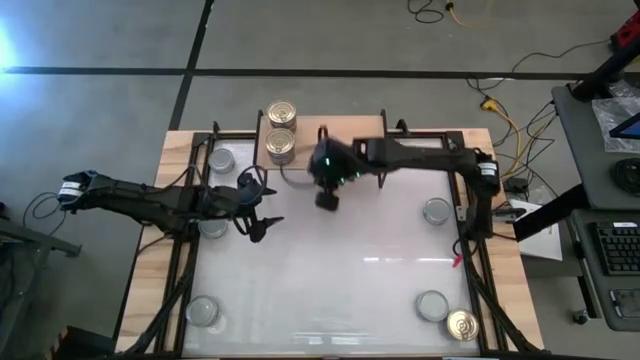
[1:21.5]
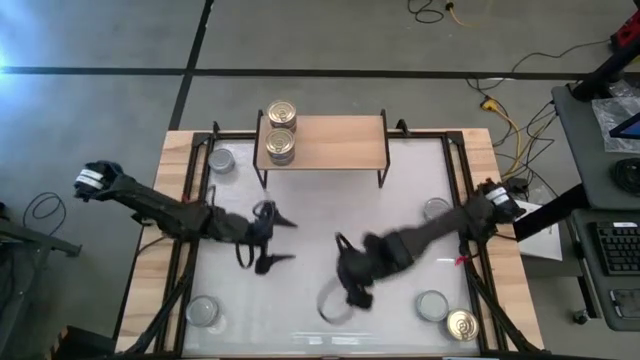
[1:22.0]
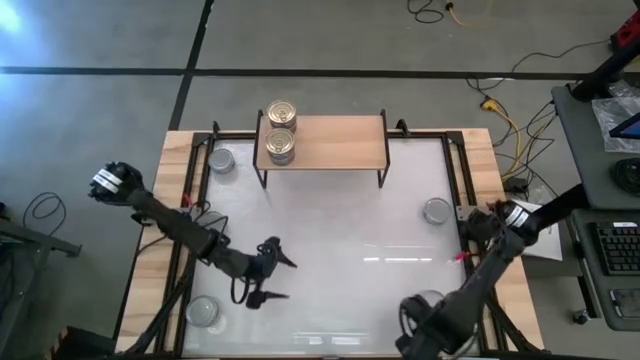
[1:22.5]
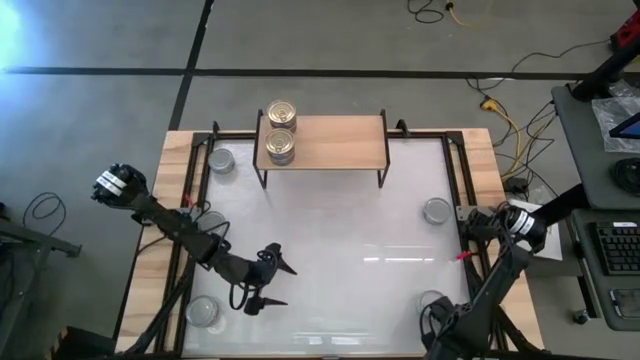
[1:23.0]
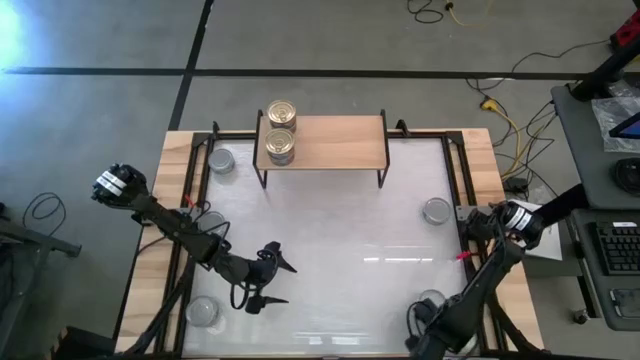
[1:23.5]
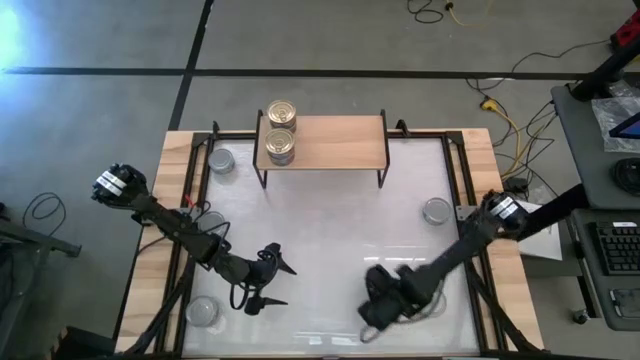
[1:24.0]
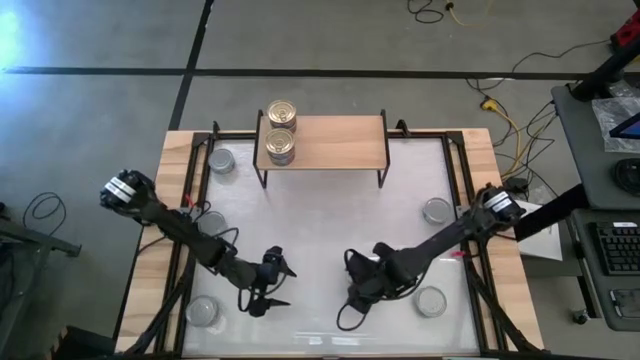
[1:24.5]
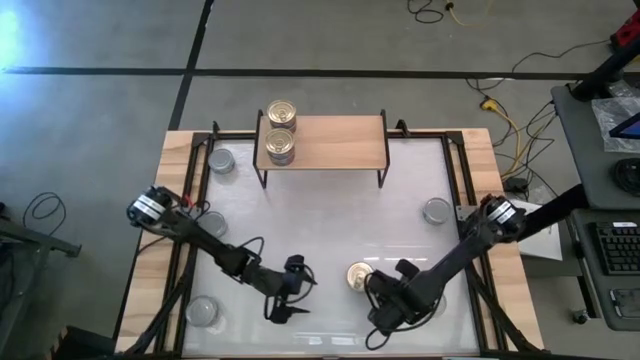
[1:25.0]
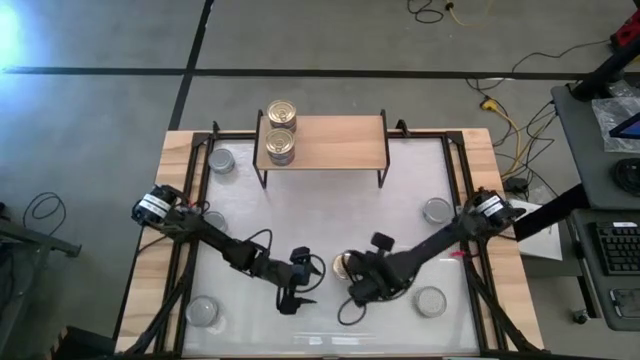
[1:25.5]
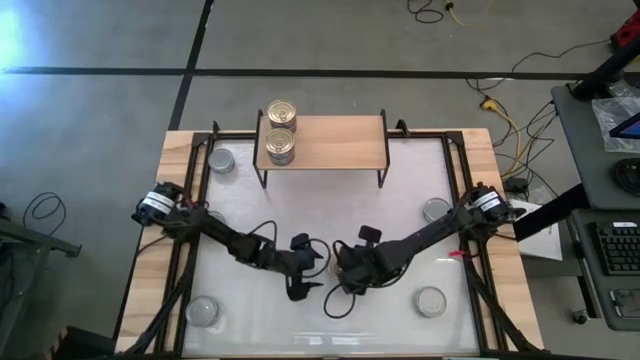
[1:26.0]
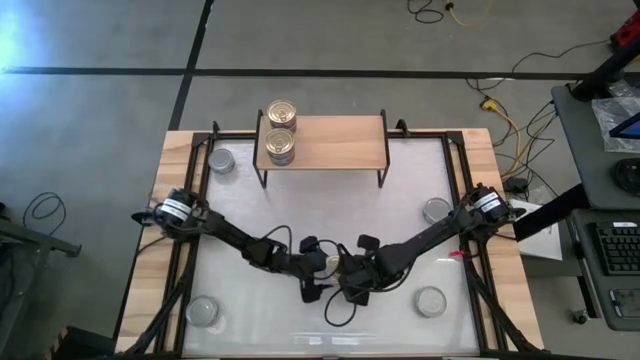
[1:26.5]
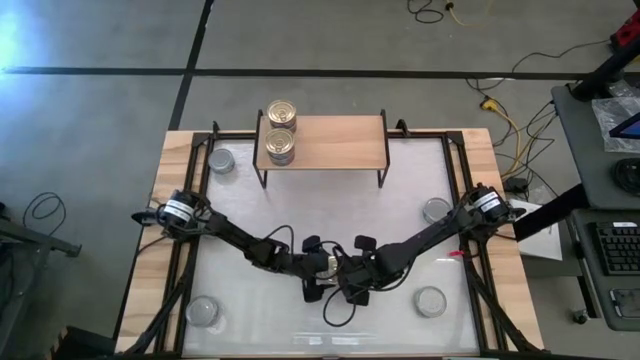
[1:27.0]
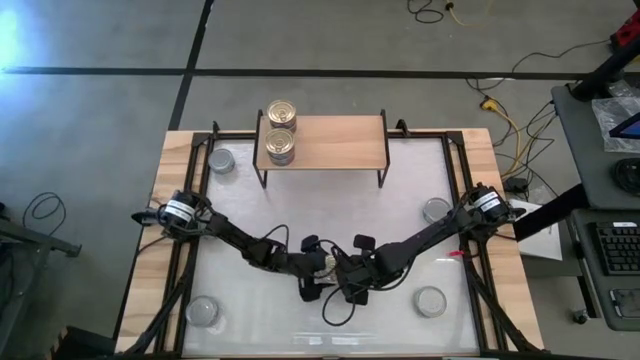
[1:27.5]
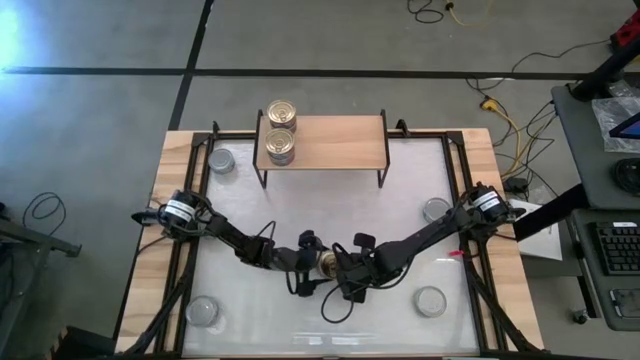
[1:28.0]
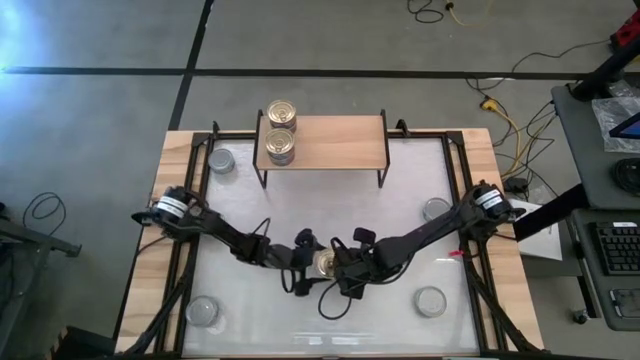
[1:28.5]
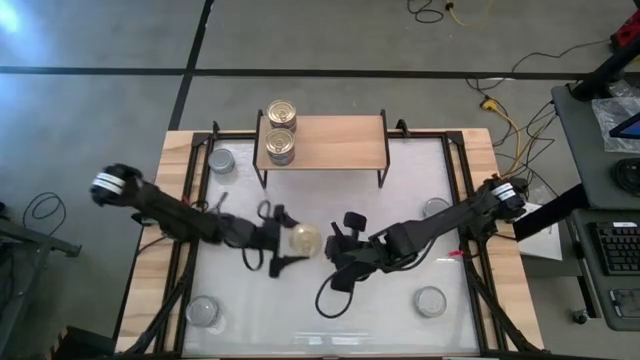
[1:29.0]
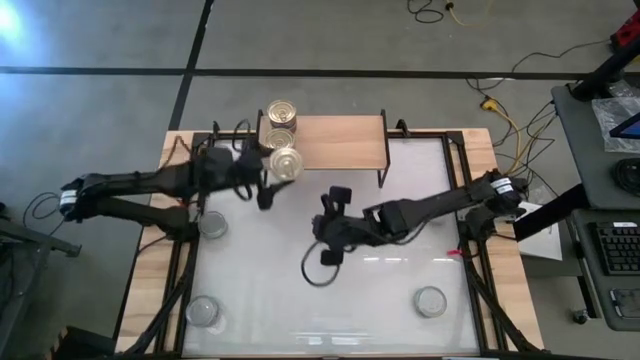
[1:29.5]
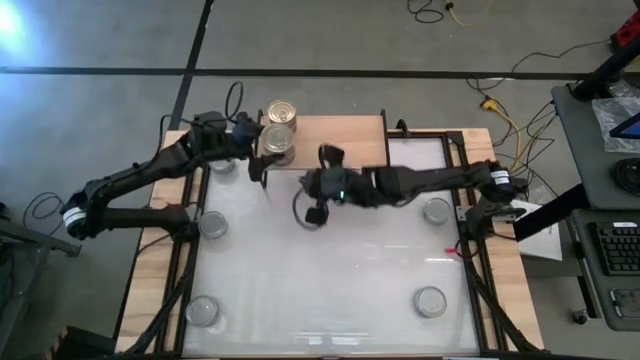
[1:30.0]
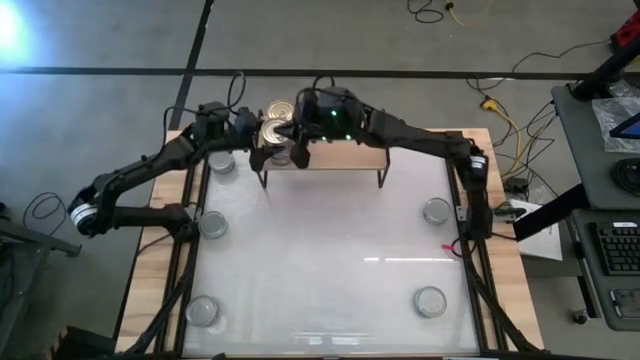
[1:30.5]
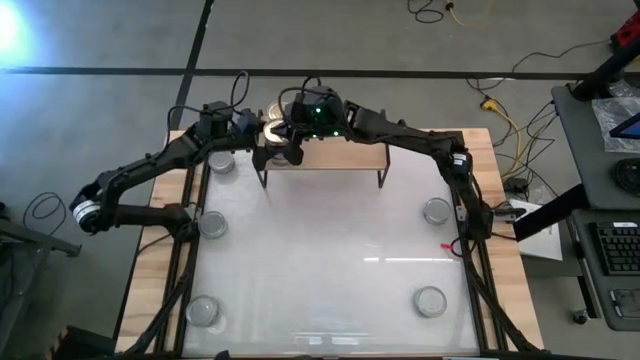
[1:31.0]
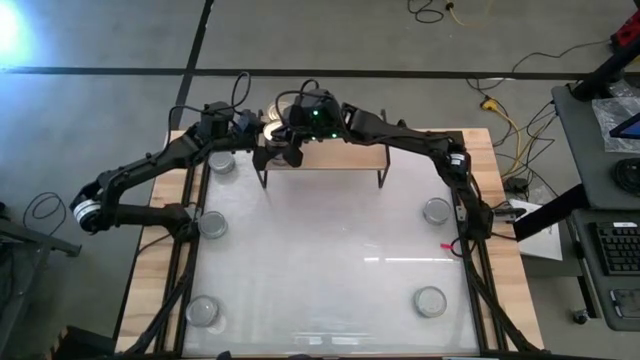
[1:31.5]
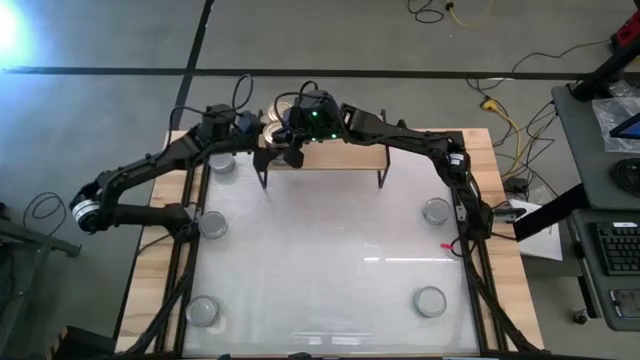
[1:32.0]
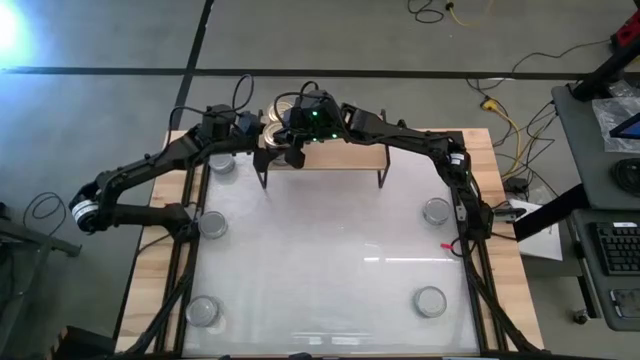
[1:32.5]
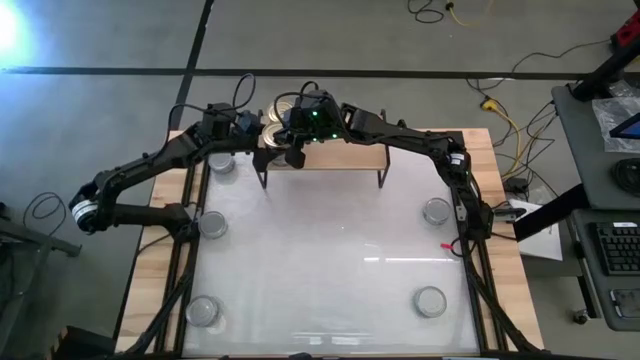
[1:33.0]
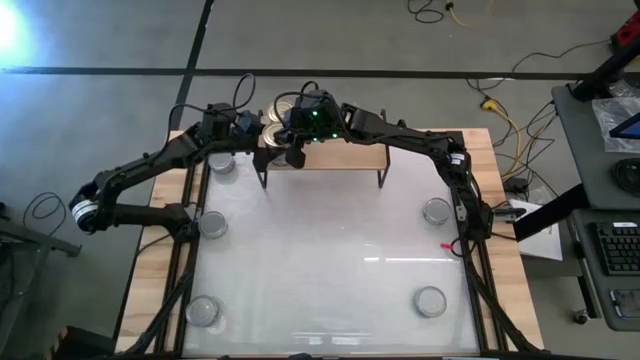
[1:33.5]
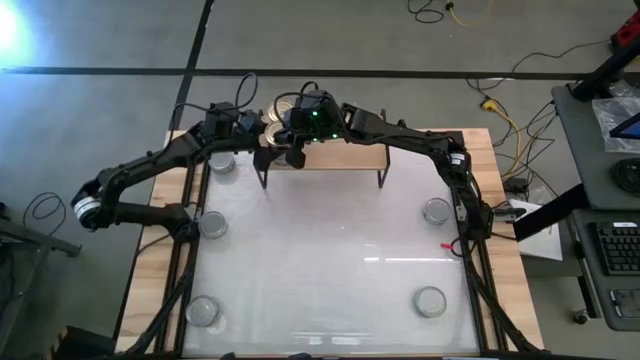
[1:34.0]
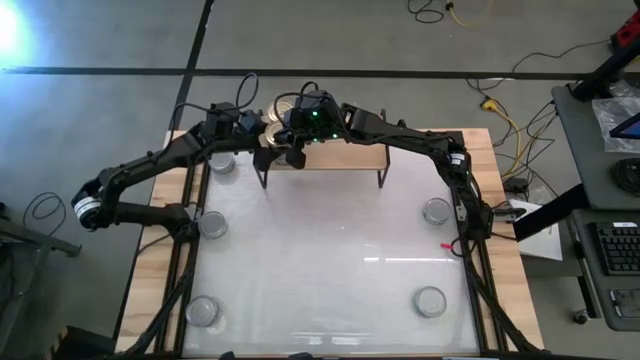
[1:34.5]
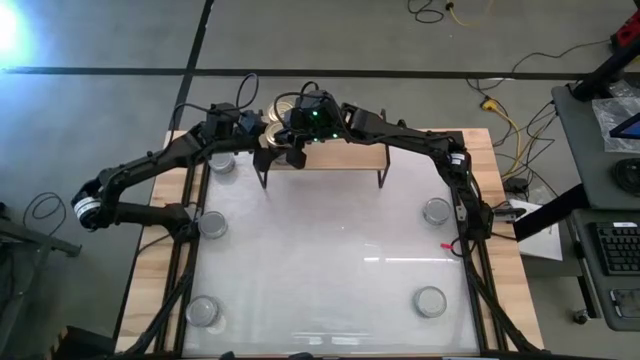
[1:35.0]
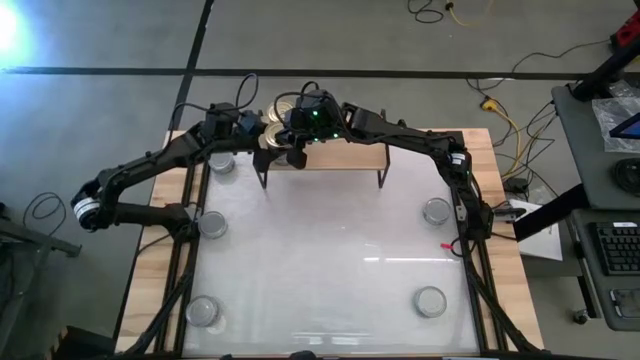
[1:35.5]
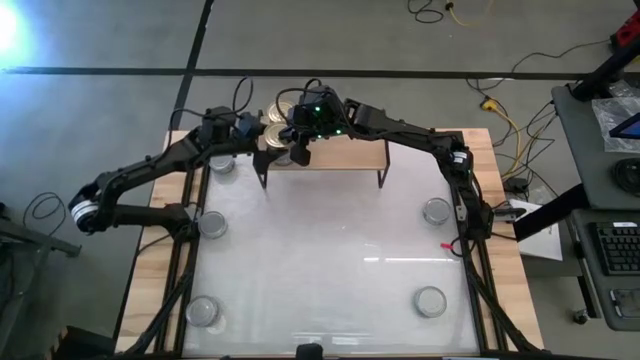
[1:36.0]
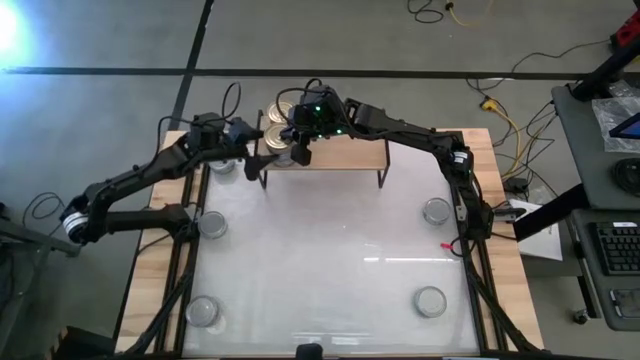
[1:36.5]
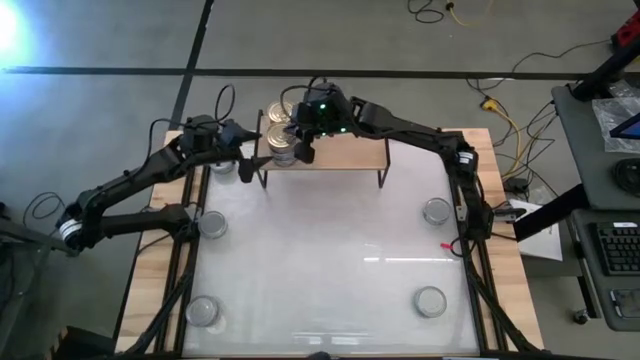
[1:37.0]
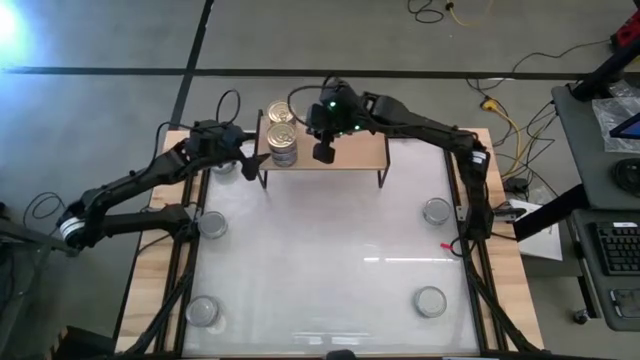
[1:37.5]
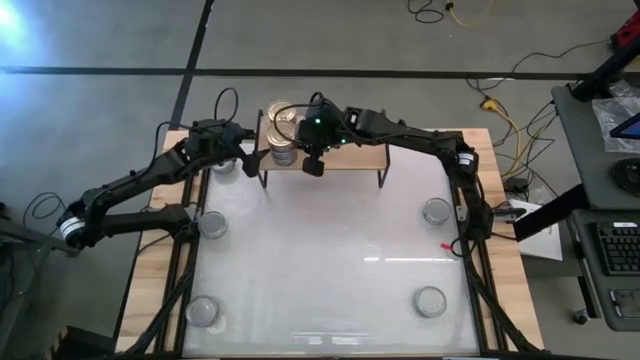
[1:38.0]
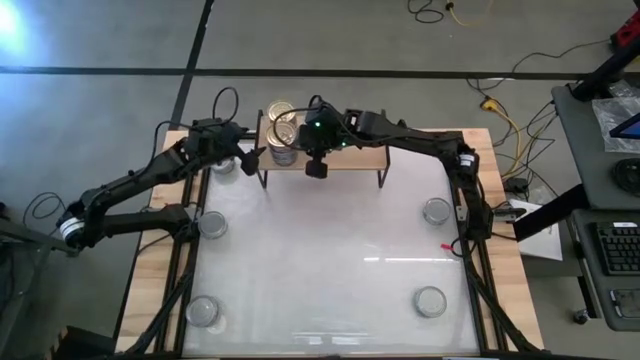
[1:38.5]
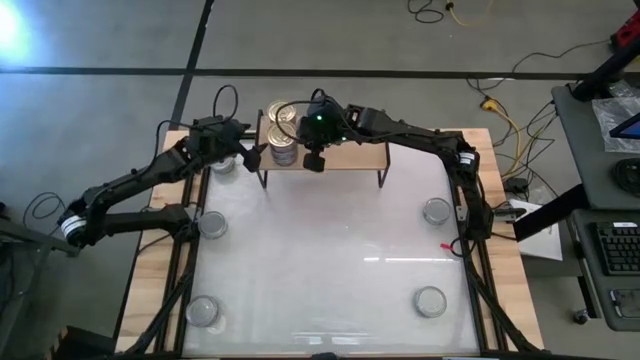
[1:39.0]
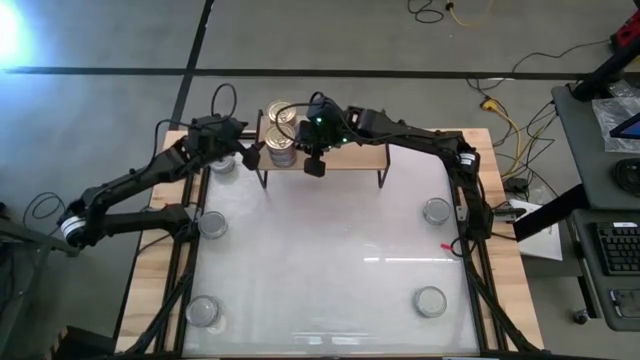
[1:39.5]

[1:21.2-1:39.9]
Task: Stack canned seafood by type on shelf
Stack the blue-pink tuna can on top of the other blue-pink tuna on the shelf

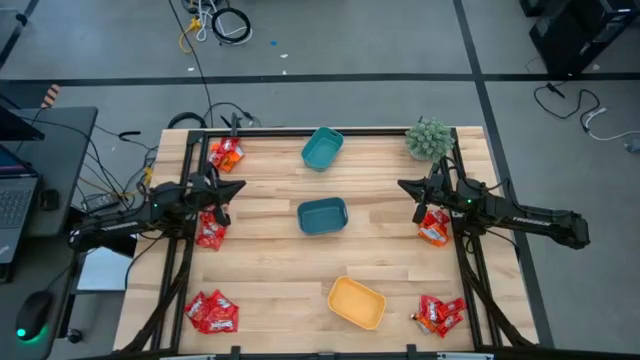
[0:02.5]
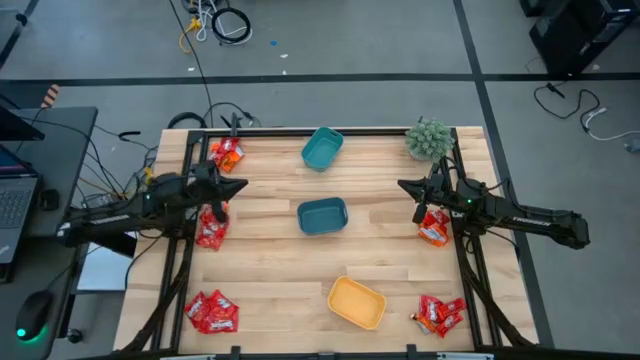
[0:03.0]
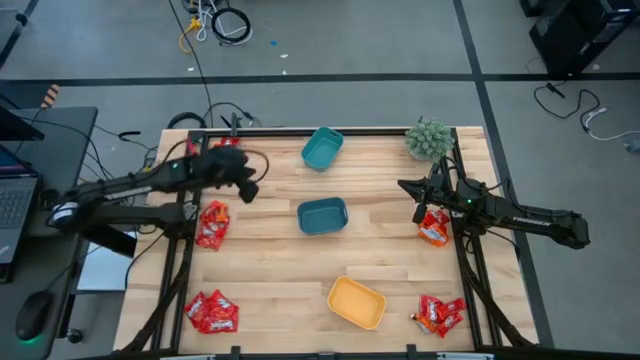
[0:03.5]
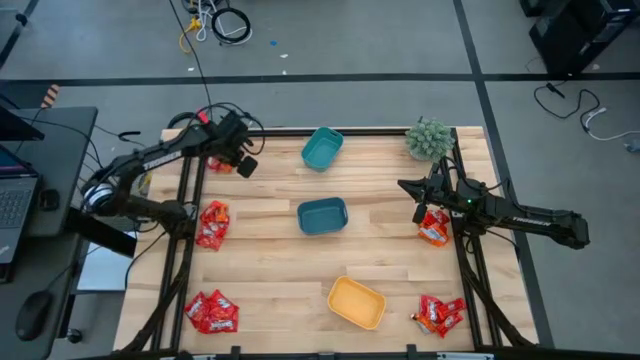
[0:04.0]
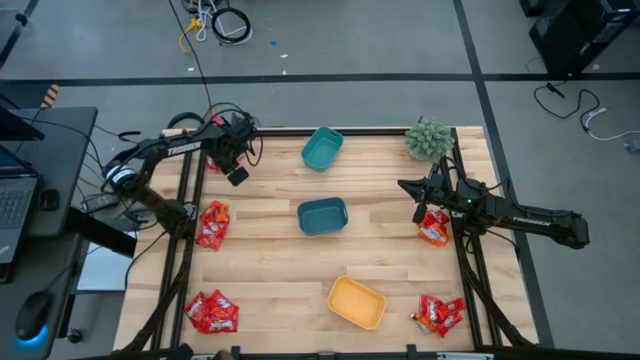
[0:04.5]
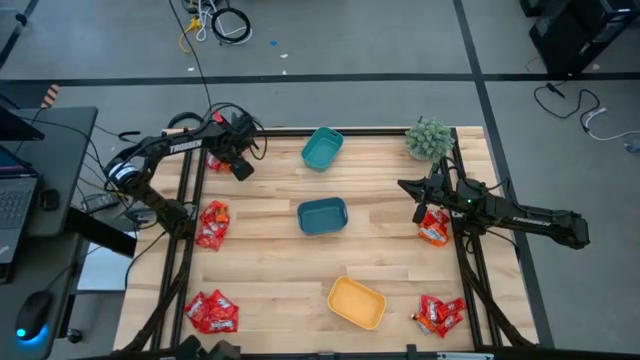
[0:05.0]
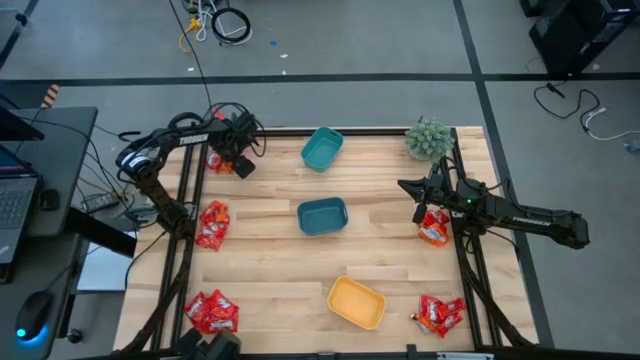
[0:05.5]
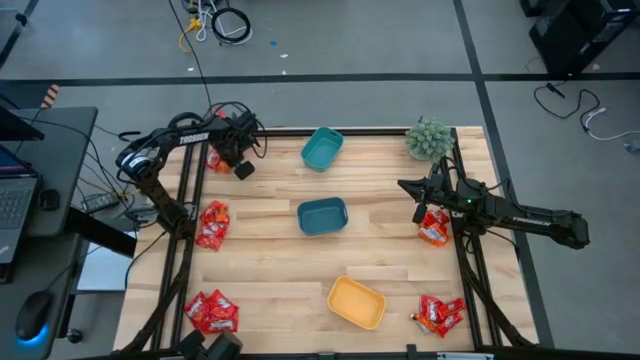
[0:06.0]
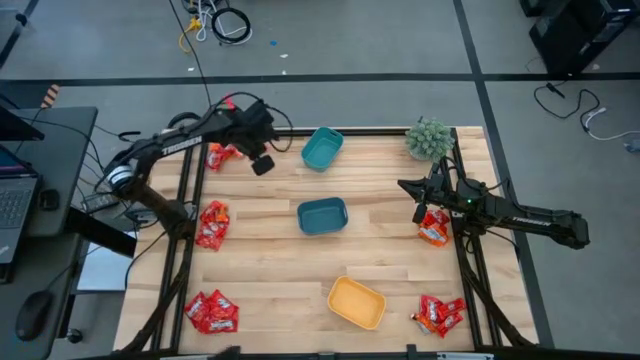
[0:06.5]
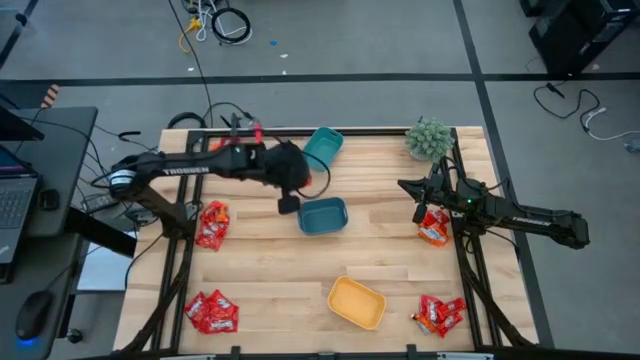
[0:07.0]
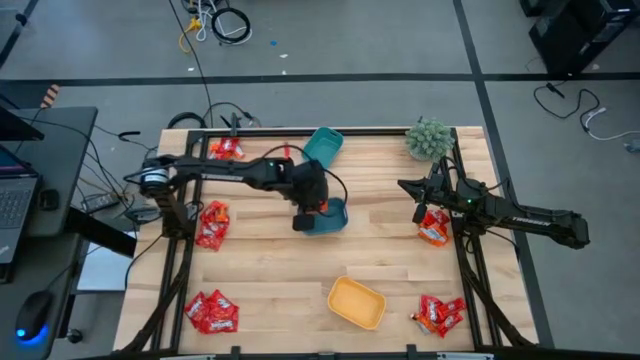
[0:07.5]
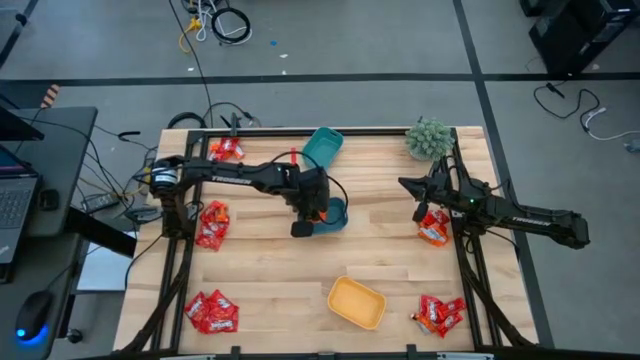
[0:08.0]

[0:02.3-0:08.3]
Task: Sort candy
Put the orange chocolate into the blue bin
